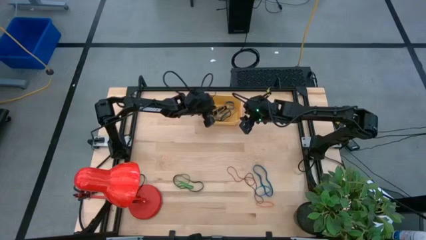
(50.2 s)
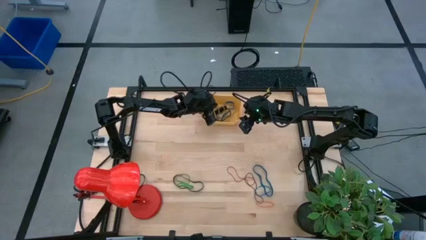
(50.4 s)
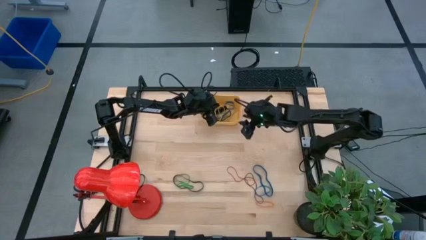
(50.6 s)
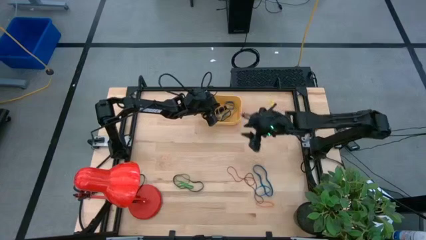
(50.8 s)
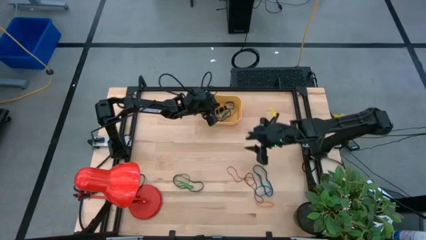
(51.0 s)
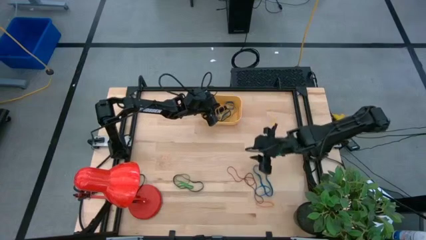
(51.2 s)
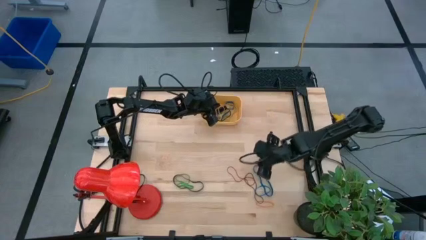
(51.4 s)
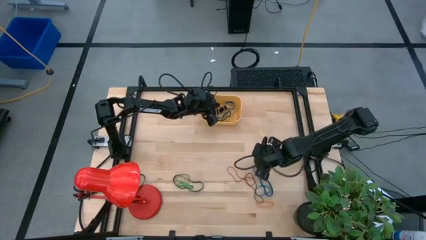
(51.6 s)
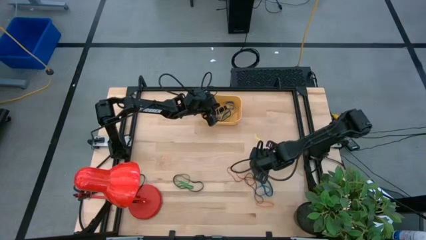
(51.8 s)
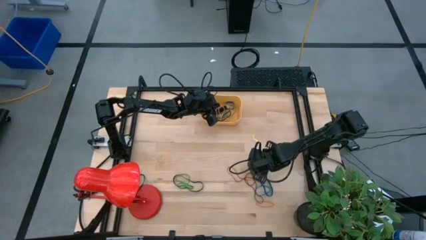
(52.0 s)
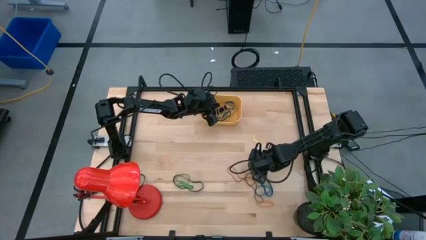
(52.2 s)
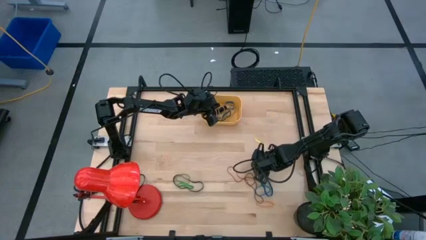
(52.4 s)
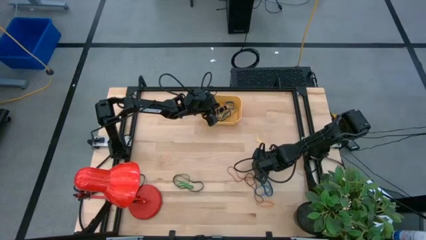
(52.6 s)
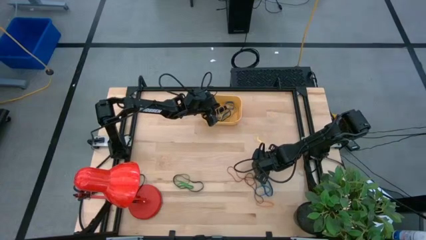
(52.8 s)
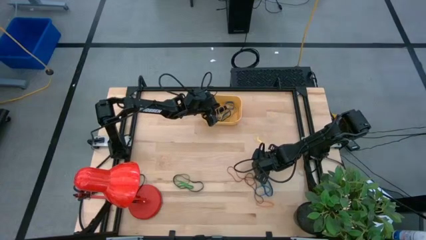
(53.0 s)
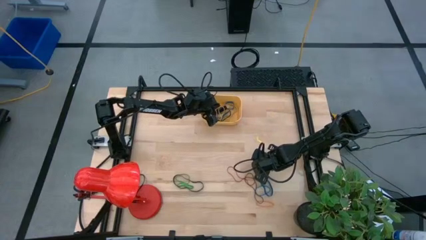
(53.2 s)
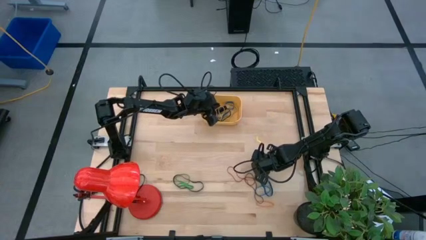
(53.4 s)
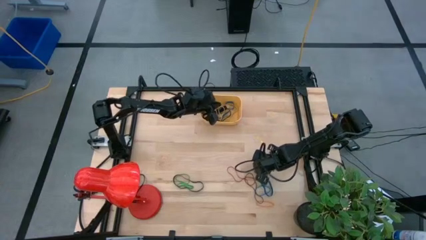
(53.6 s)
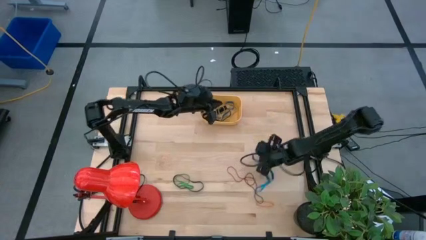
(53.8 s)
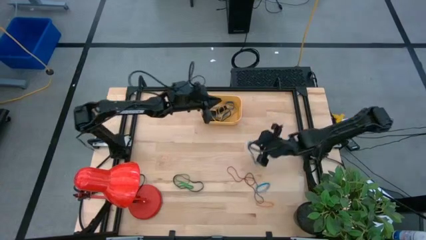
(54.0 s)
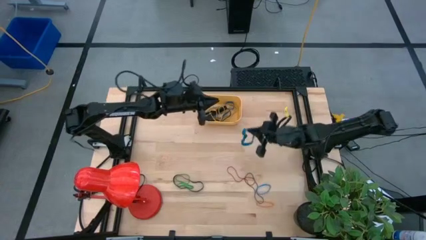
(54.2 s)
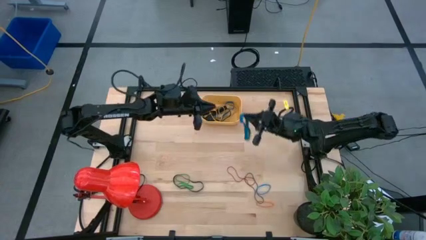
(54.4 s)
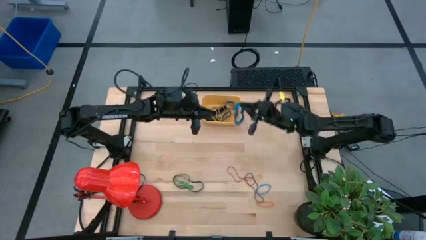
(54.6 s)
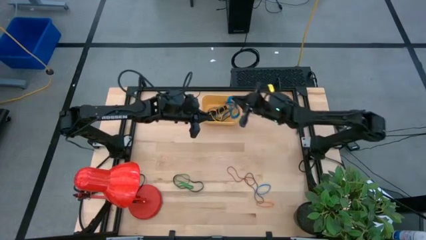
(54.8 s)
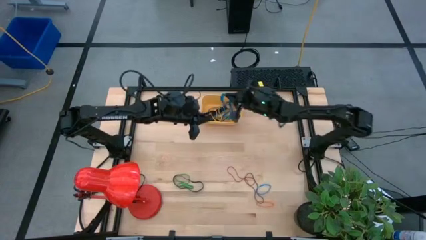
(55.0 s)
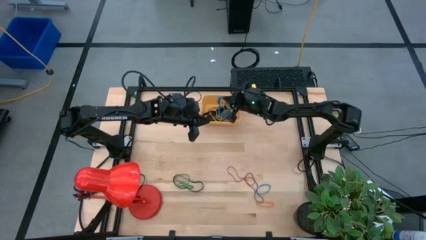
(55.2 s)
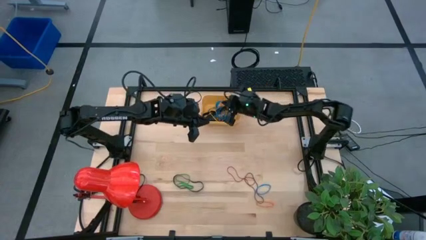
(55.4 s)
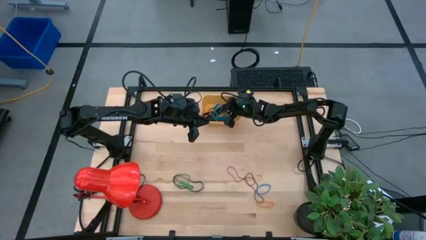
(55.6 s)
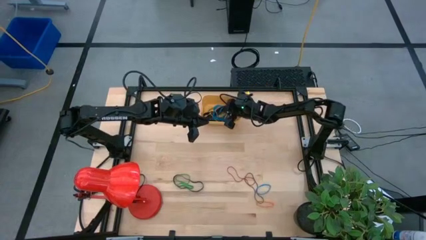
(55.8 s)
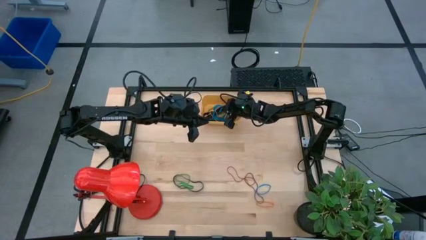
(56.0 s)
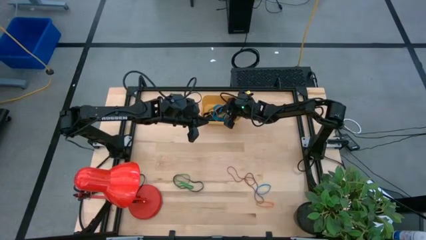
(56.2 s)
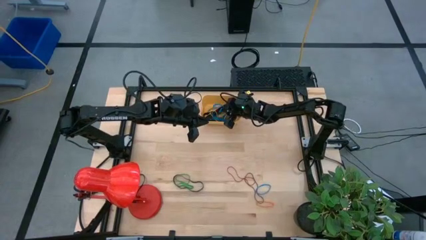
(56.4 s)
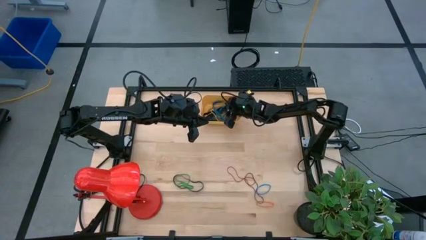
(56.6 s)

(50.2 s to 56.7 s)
Task: Pick and place rubber bands into bin
Put the top blue rubber band into the yellow bin

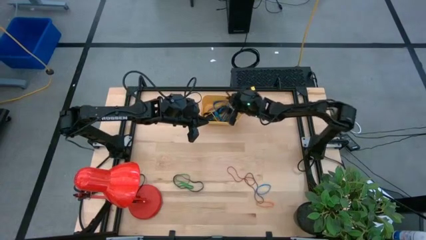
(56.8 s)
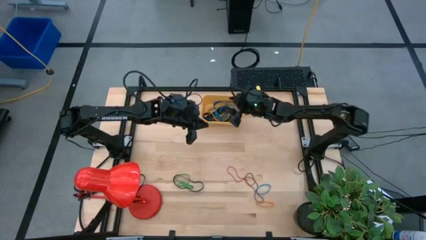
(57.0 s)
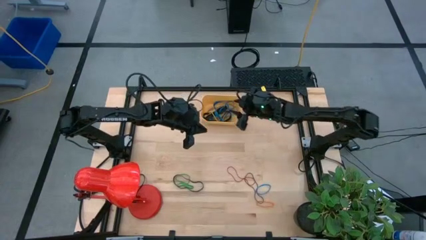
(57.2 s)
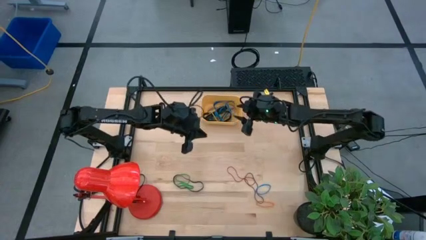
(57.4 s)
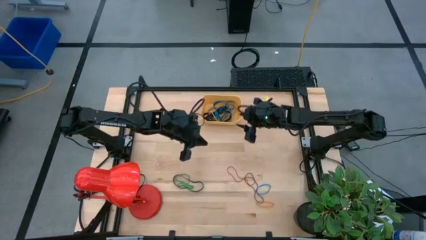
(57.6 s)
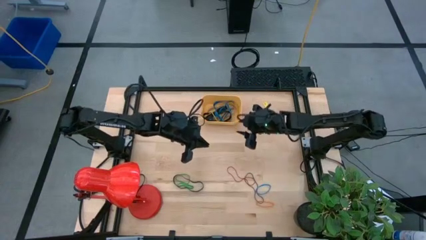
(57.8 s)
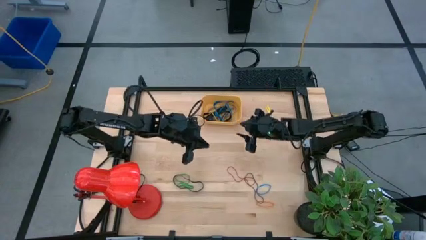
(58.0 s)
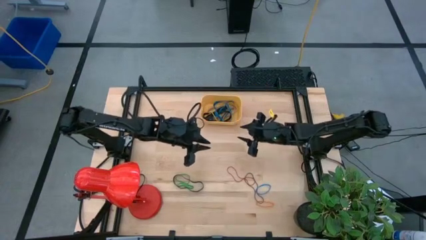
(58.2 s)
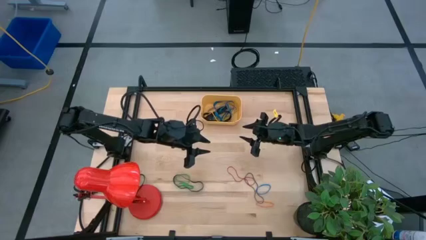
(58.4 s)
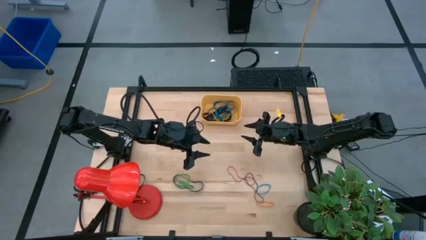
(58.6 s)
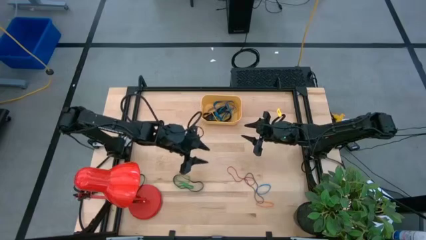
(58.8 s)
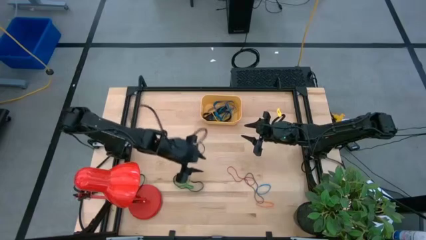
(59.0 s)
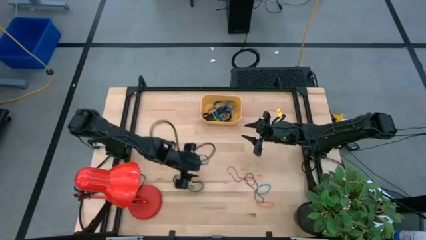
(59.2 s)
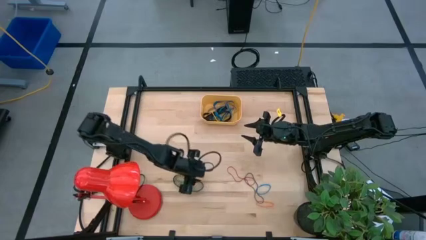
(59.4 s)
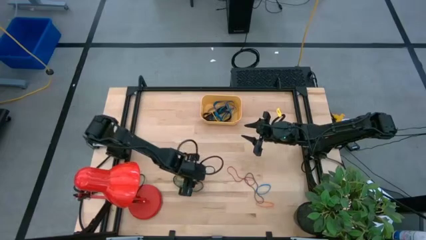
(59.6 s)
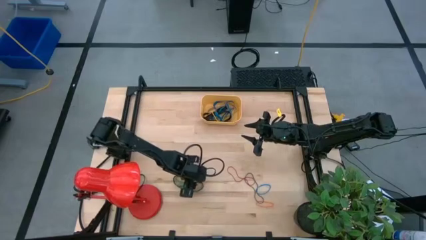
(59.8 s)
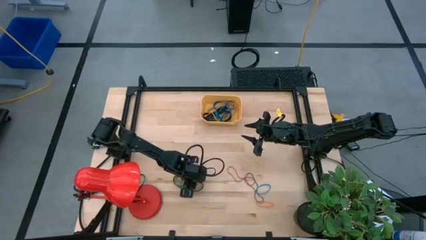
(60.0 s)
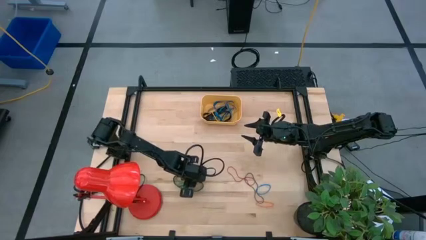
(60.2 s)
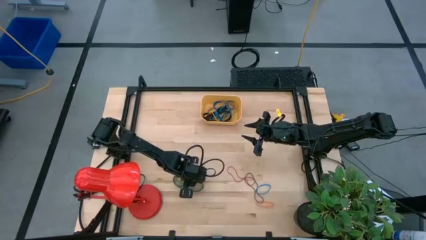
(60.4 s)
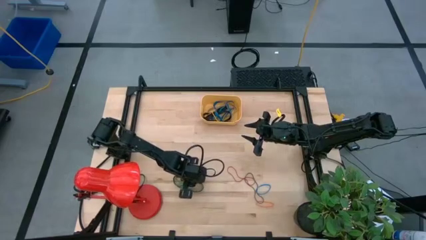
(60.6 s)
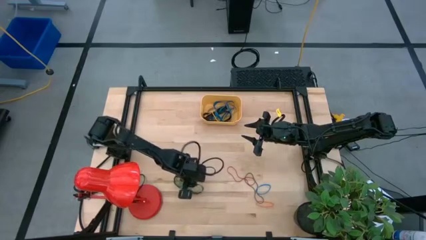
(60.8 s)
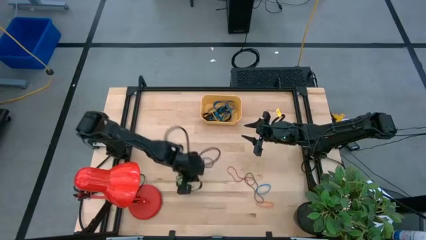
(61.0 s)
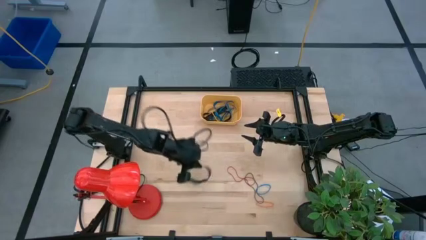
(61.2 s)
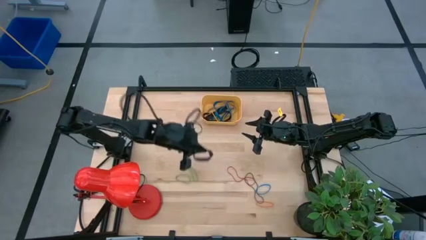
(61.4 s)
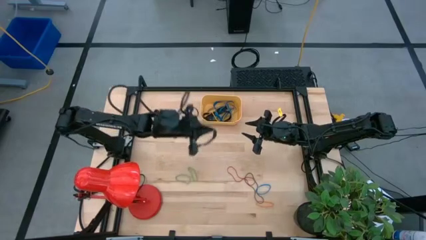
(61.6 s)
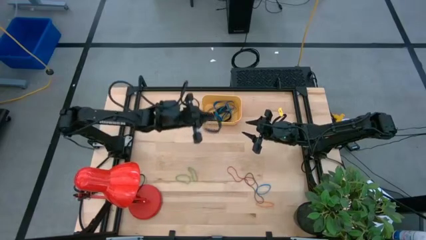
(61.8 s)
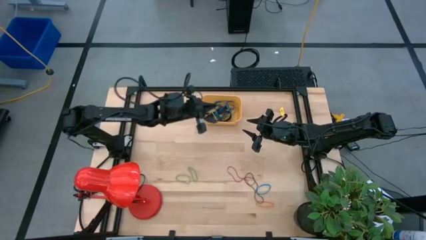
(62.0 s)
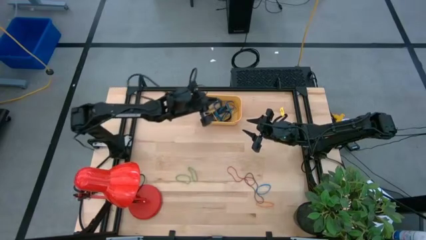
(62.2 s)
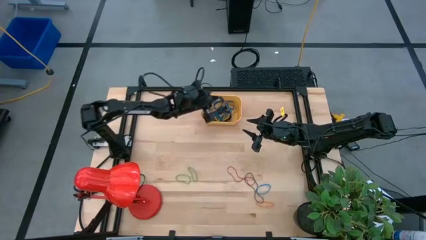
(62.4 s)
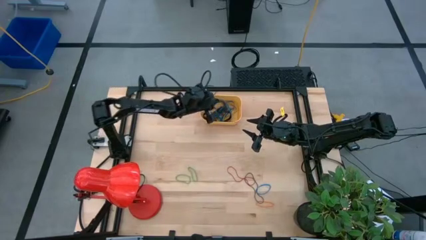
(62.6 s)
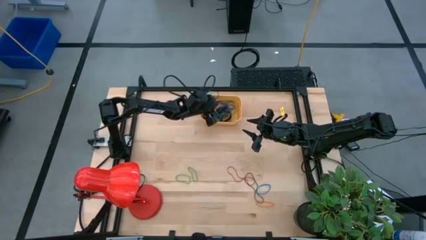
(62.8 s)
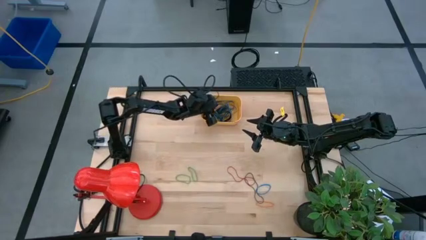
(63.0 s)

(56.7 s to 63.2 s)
Put the black rubber band into the yellow bin

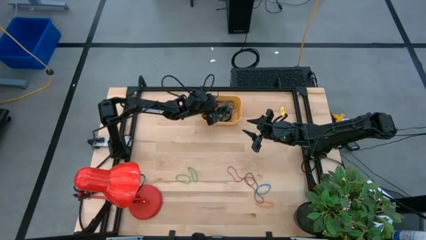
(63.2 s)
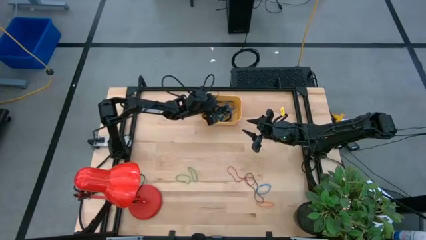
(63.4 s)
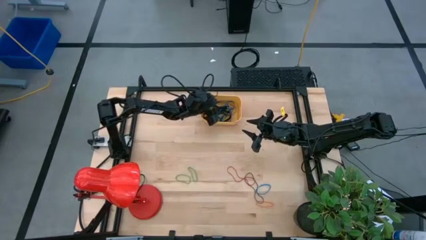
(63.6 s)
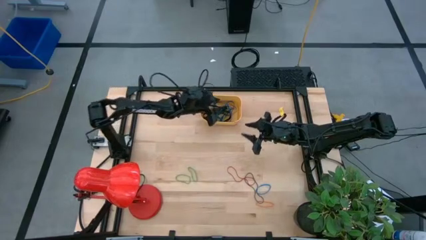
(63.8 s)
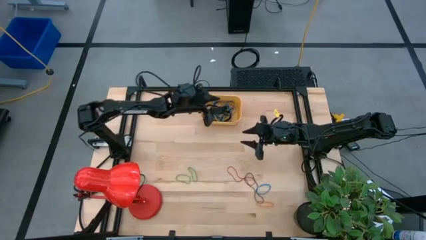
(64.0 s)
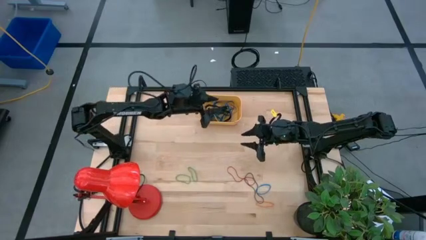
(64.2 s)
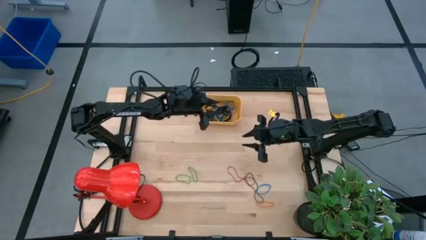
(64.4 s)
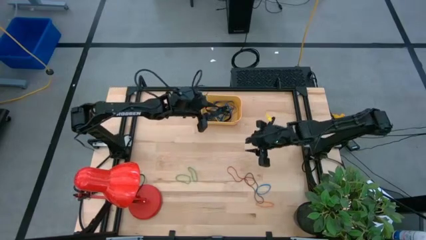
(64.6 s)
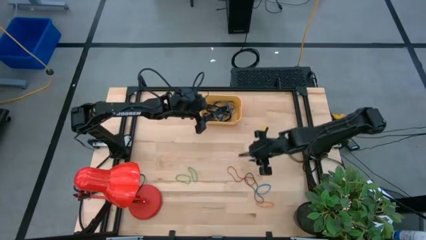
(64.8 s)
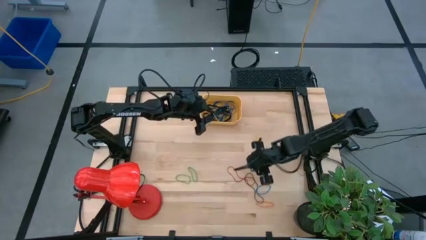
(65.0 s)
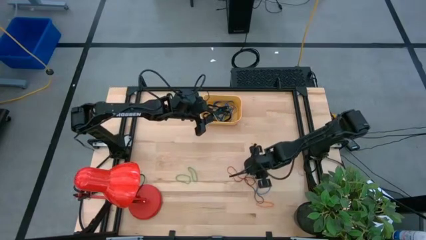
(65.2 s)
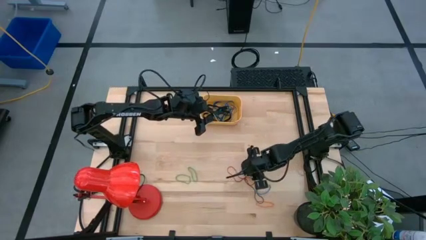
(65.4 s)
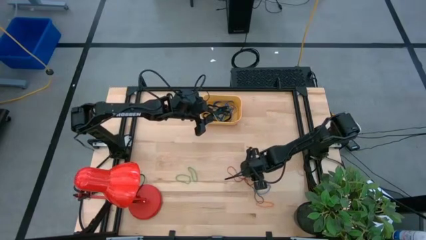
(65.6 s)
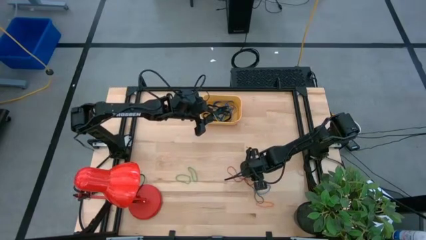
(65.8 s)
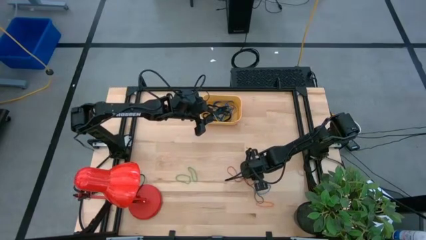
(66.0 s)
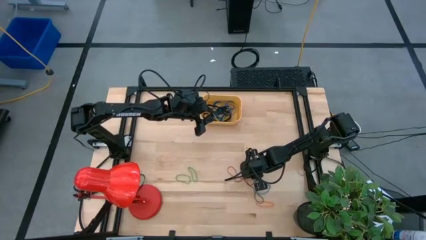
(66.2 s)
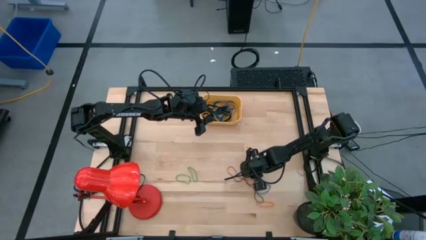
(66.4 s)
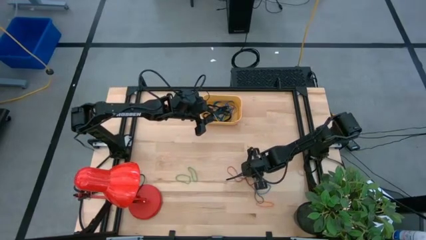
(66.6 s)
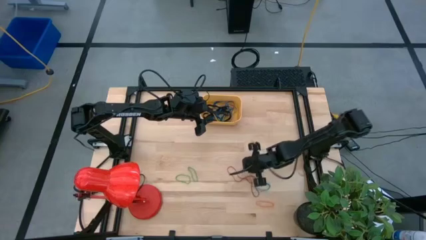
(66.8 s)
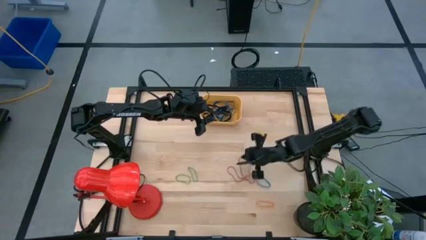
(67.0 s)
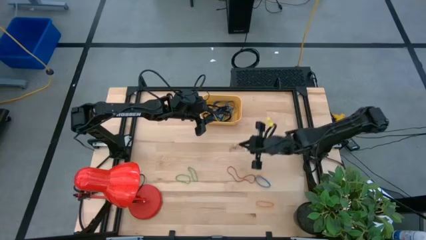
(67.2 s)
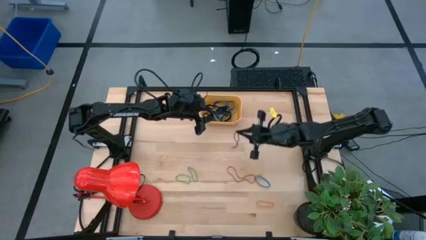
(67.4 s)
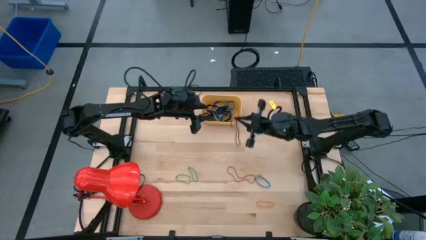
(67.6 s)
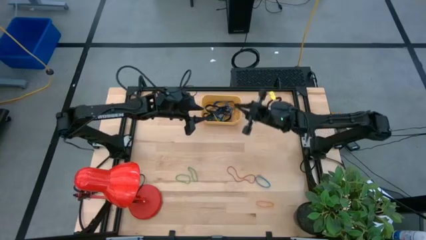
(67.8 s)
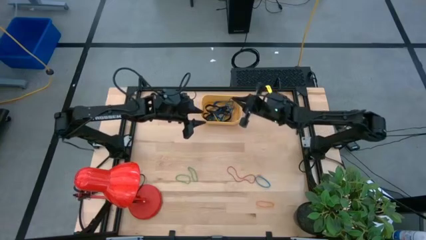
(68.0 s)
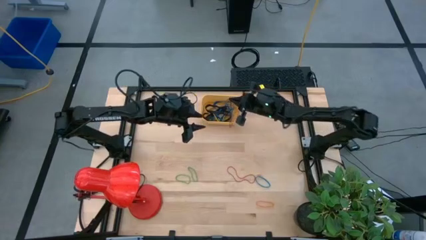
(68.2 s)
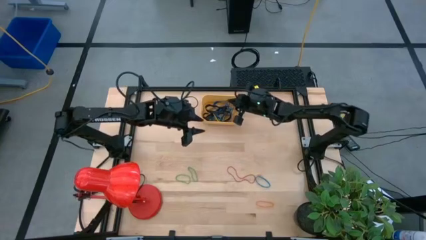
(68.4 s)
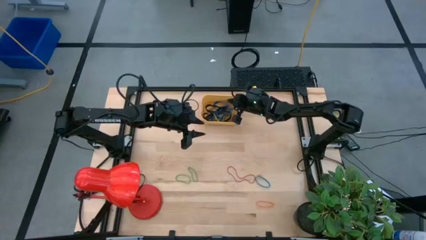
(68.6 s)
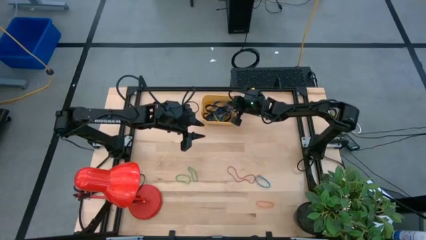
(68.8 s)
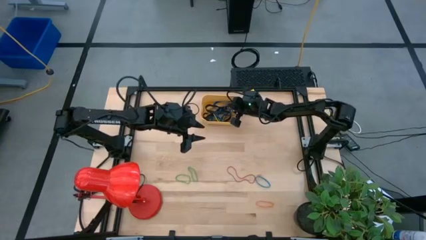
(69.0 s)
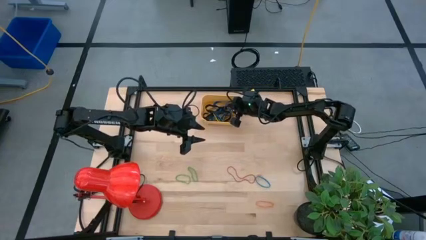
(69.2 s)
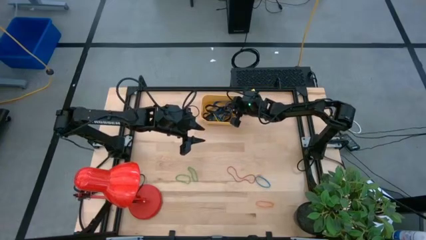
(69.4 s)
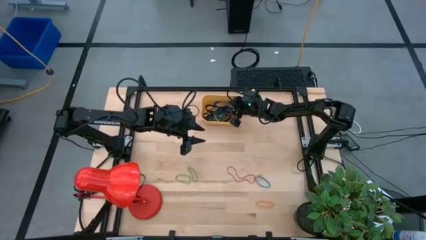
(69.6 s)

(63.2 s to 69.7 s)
Put the purple rubber band into the yellow bin
